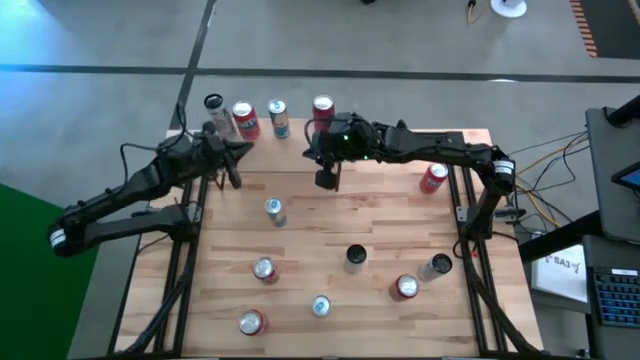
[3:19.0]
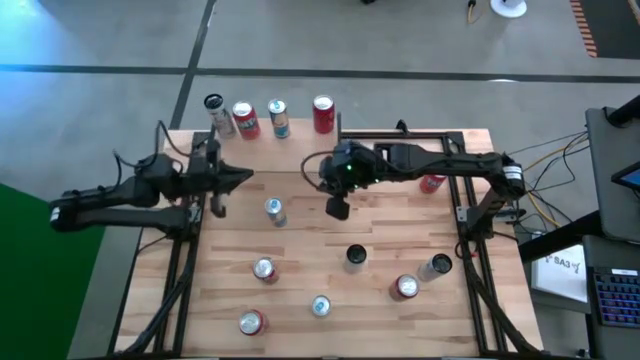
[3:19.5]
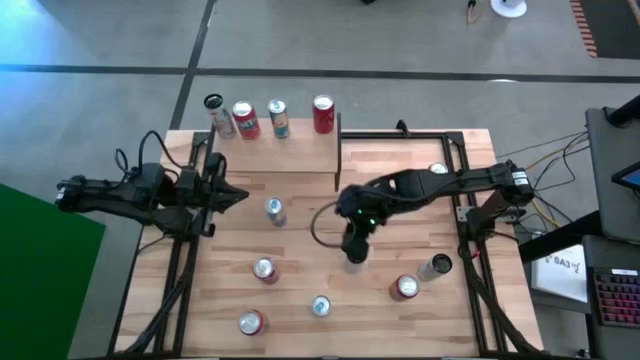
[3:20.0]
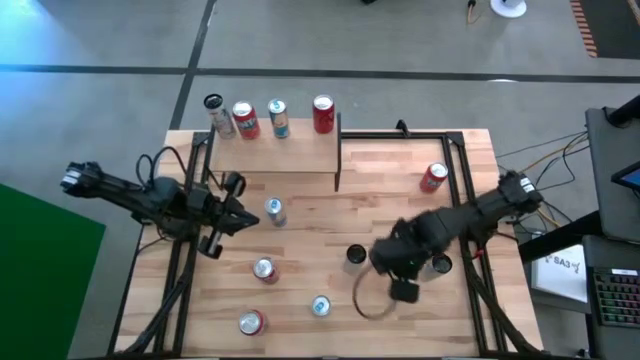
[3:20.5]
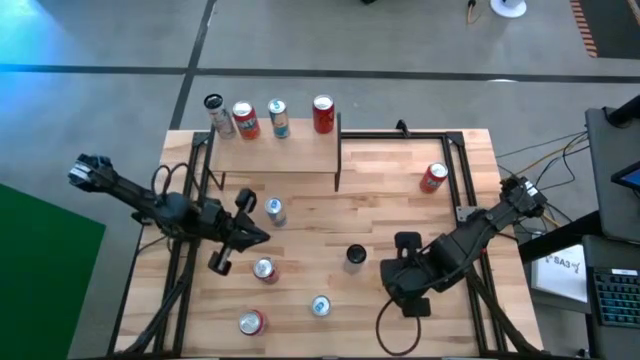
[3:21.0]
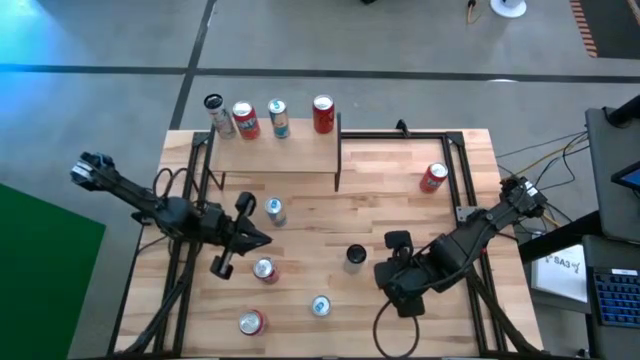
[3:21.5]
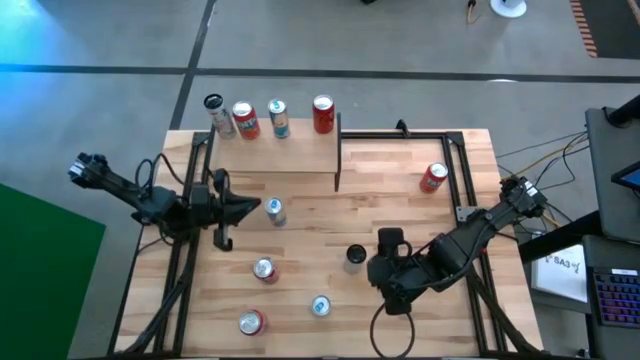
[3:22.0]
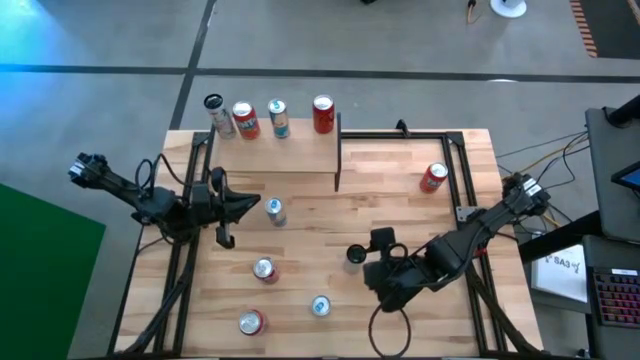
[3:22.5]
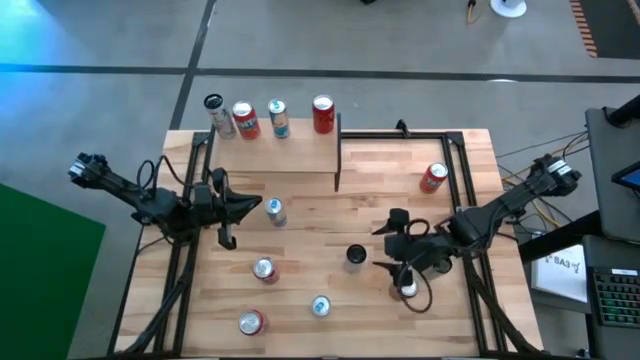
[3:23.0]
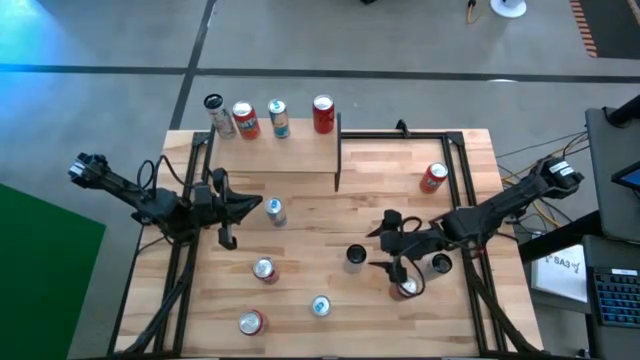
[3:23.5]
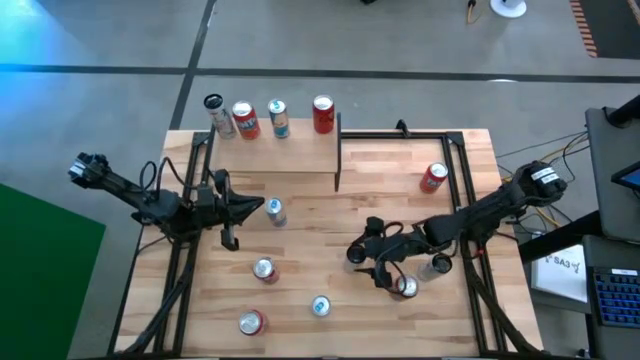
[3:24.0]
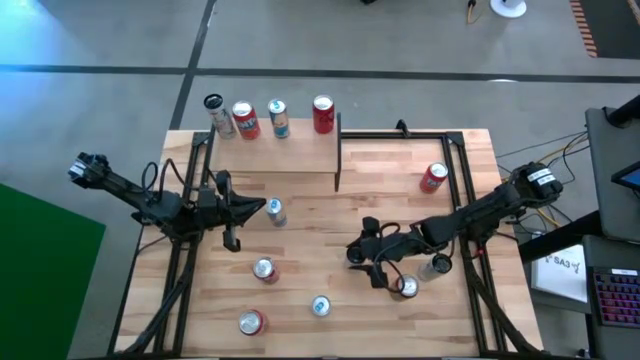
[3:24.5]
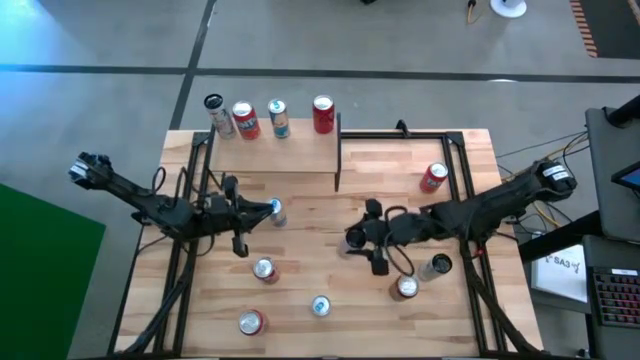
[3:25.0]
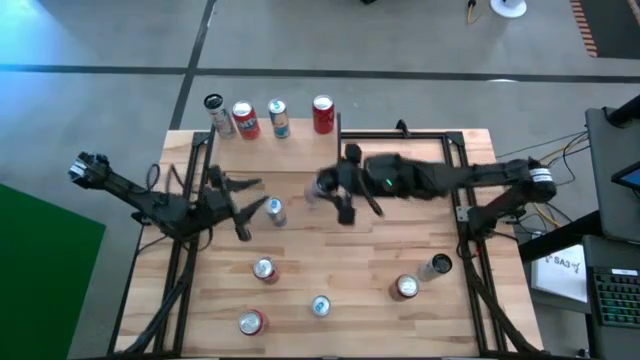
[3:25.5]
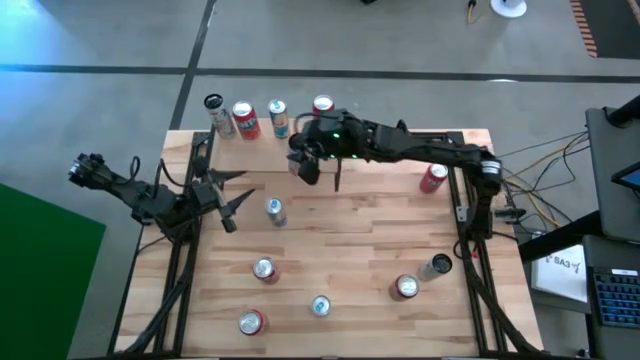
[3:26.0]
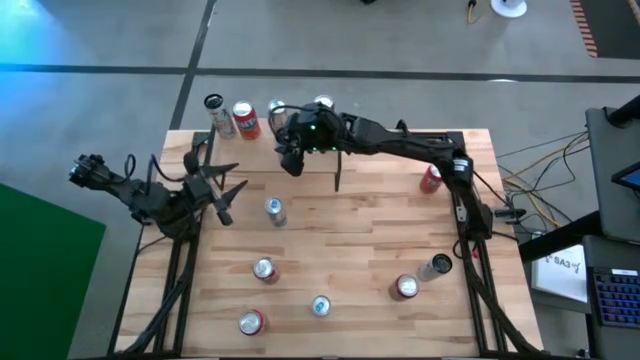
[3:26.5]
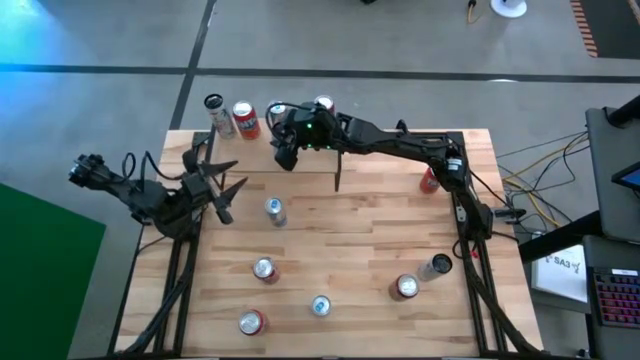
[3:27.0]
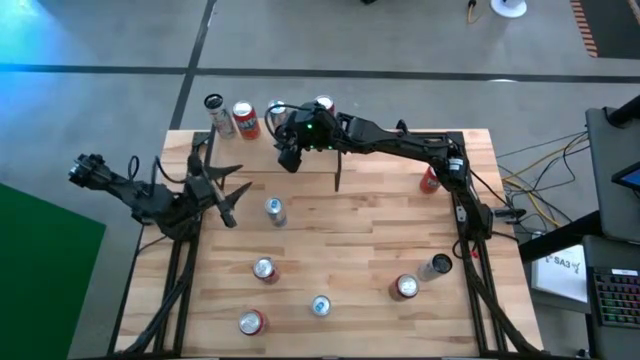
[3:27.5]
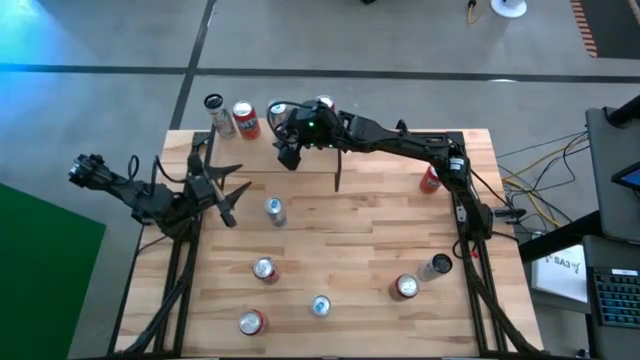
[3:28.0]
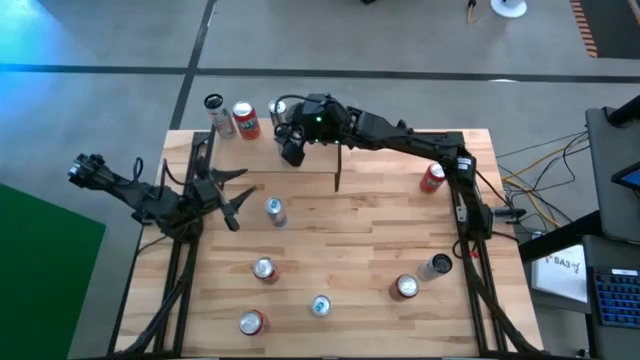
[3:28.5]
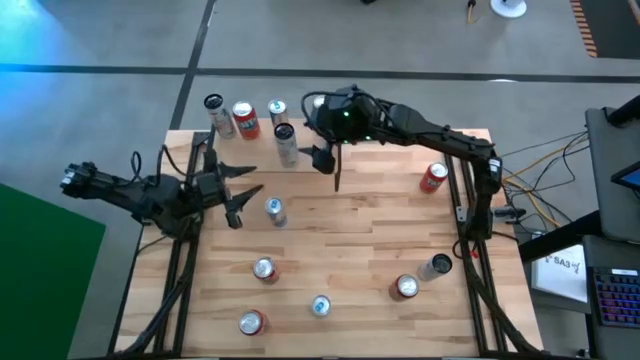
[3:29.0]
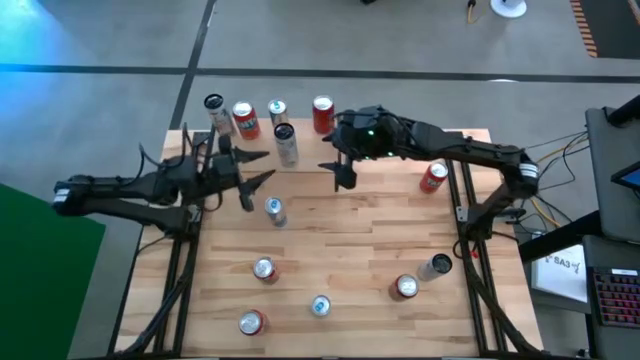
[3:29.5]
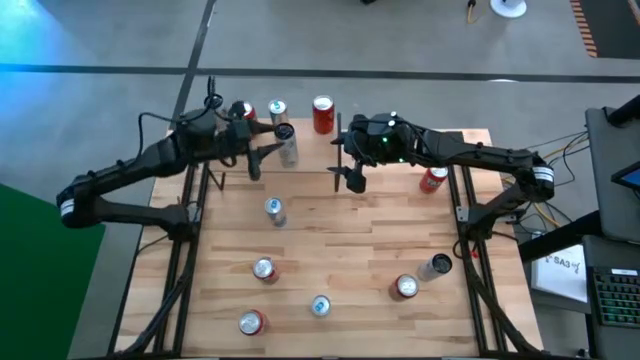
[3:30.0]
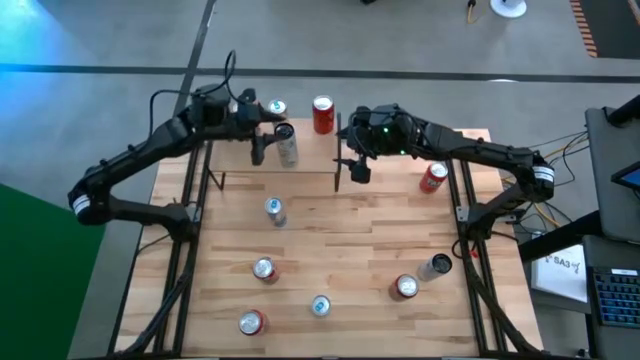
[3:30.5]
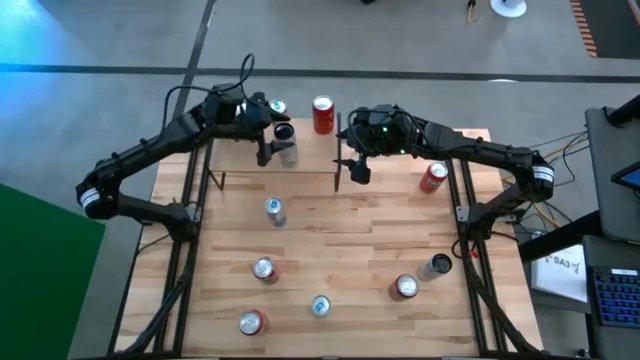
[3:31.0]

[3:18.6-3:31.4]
Task: Place canned beverage on shelf
Put the white pink soda can on the shelf

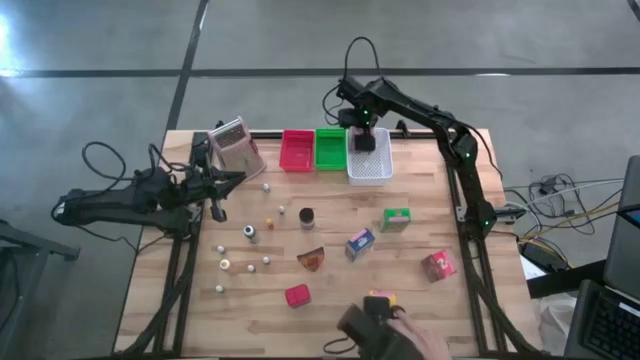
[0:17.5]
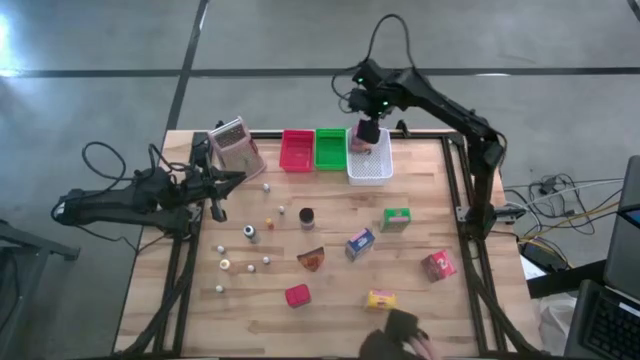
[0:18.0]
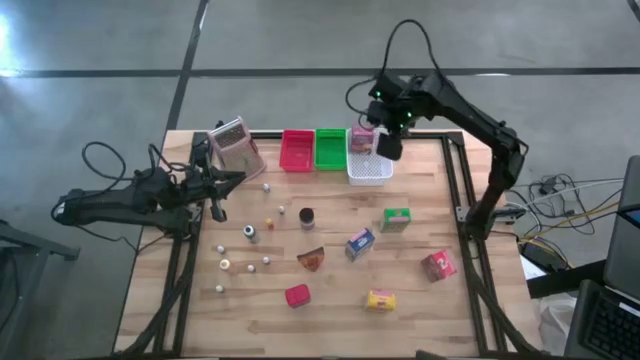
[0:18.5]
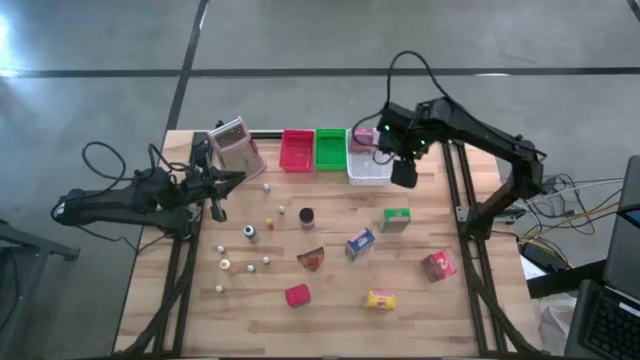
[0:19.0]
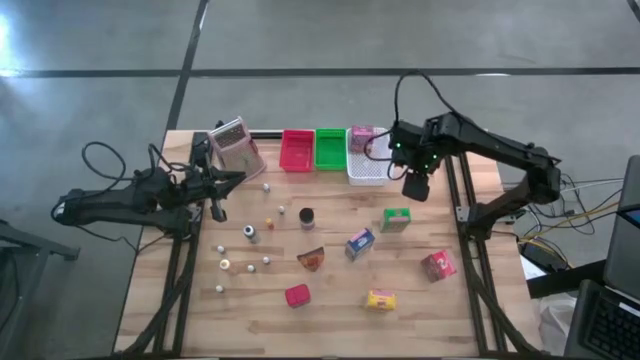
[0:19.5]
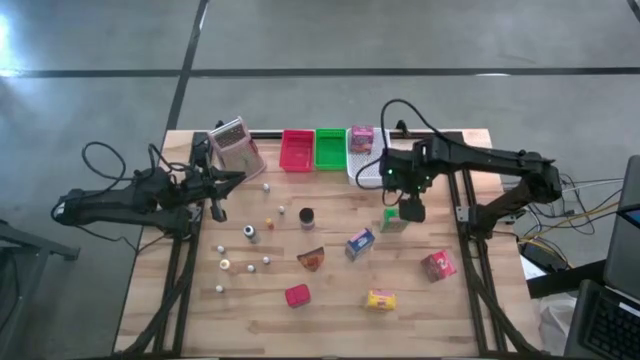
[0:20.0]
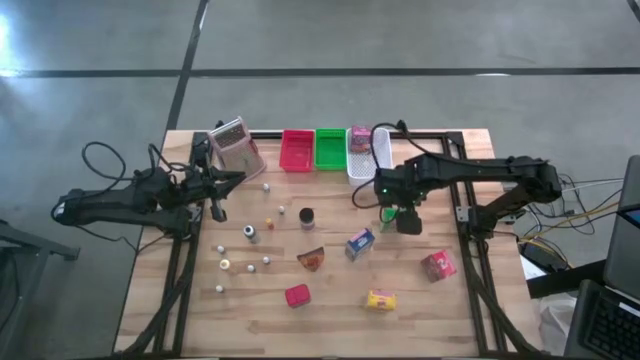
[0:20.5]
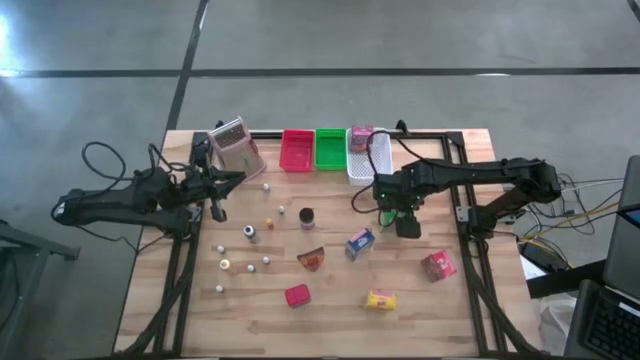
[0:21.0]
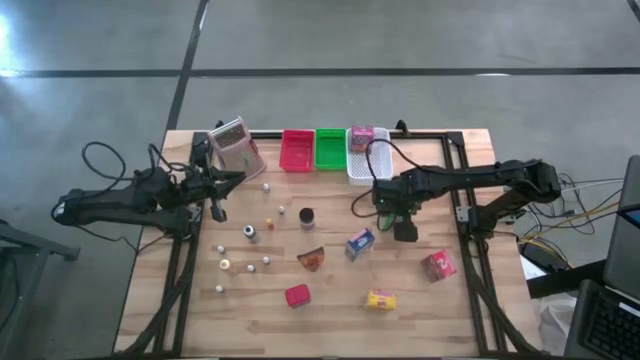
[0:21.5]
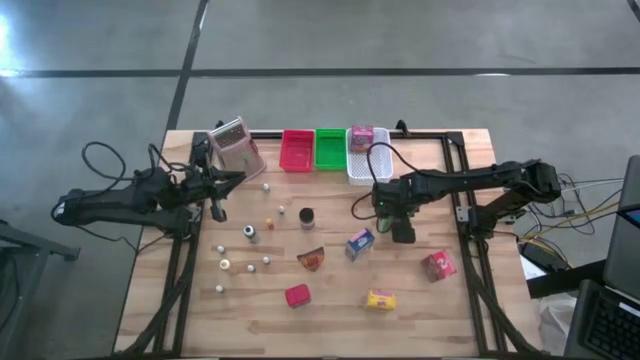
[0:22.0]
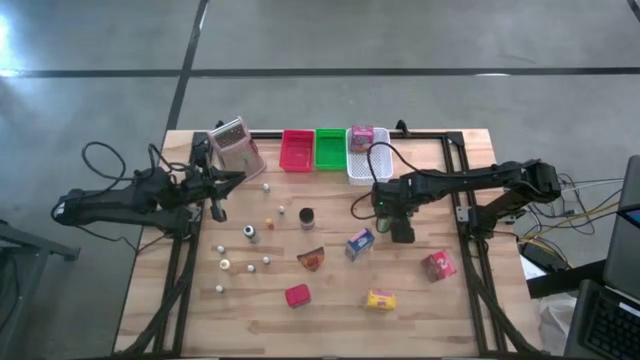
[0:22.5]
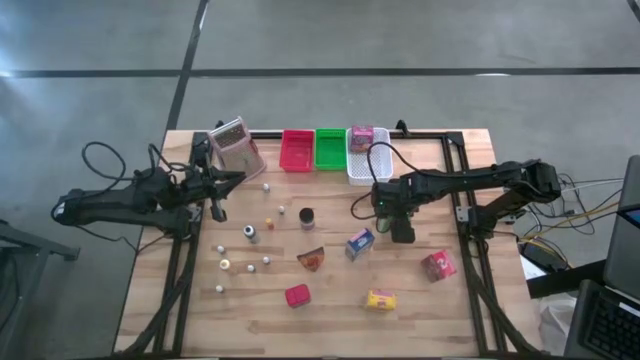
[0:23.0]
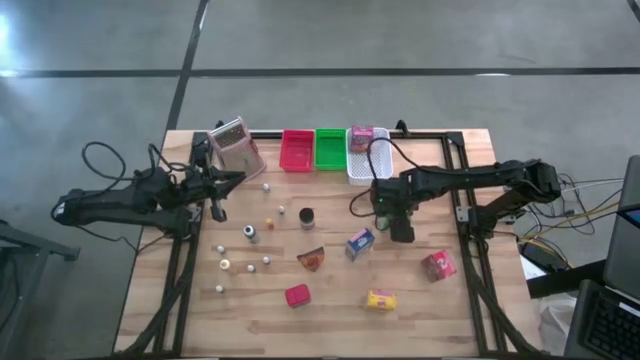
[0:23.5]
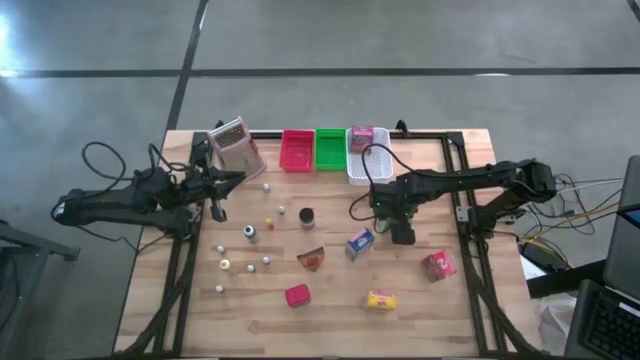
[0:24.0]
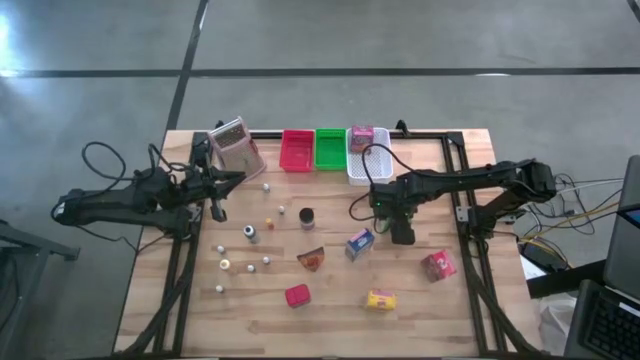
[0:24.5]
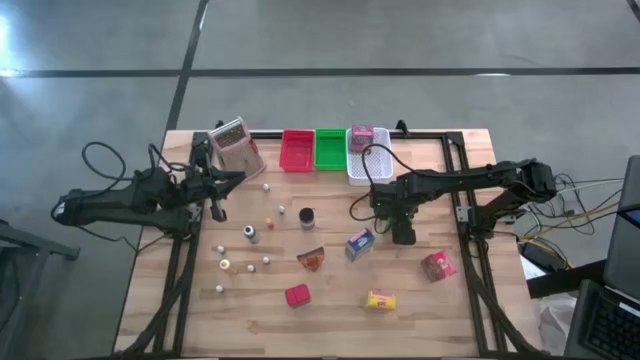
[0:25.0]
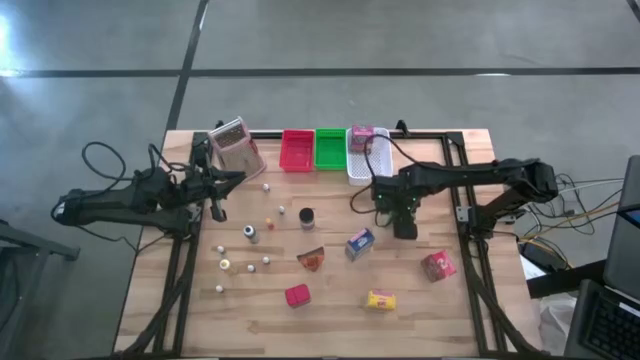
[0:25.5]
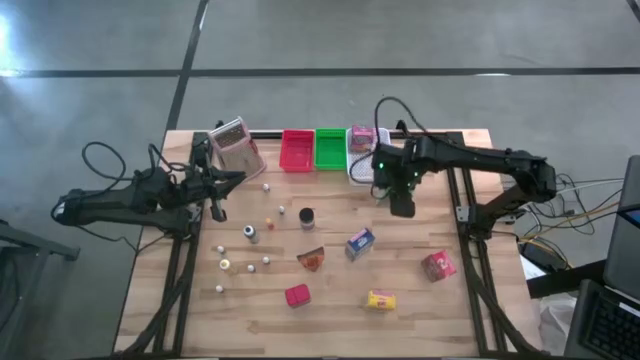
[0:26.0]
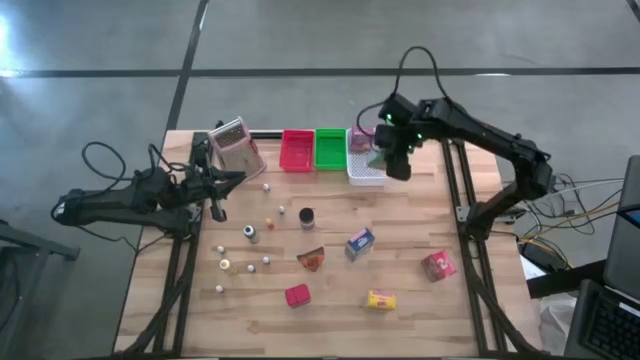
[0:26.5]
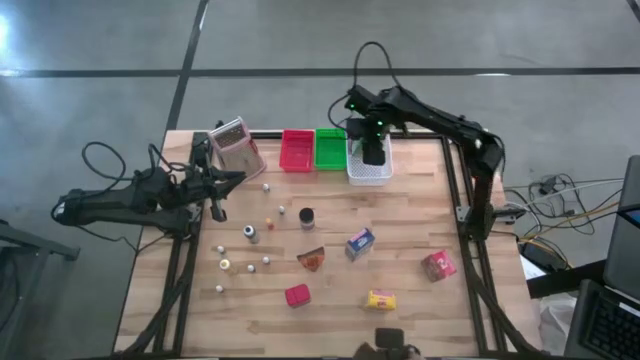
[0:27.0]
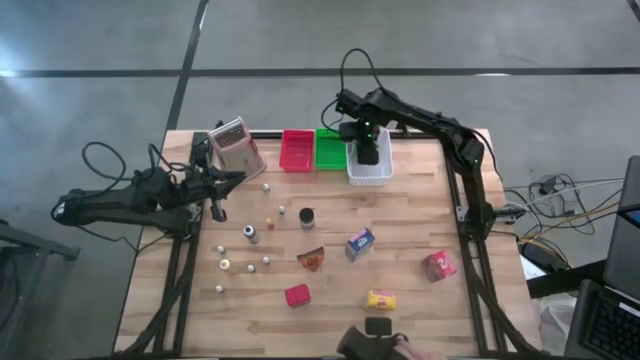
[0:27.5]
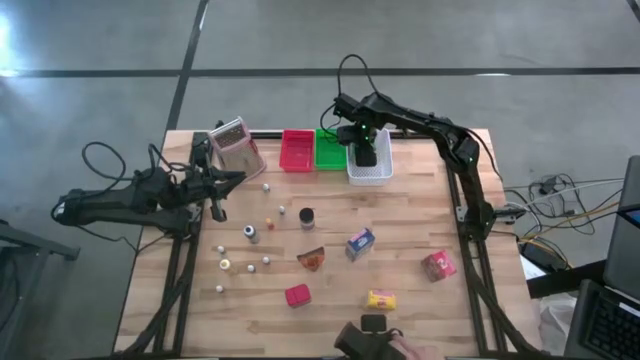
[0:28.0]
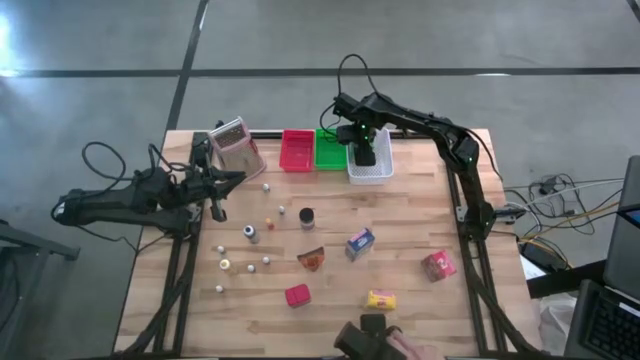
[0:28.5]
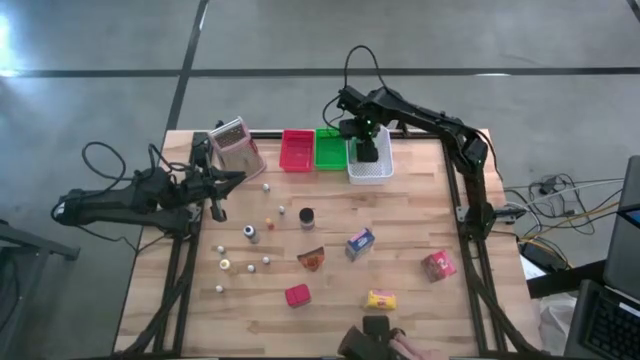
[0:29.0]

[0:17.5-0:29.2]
Task: Pick & Place Kitchen Items
Put the green cereal box into the white bin
